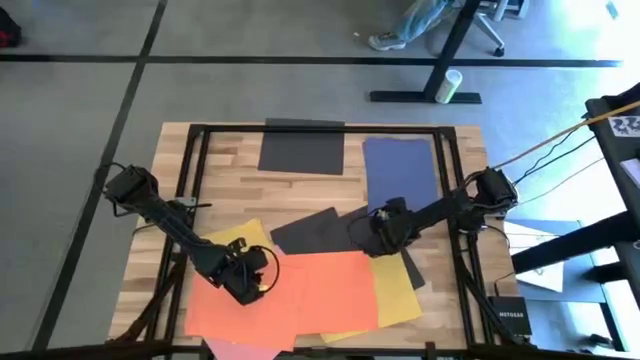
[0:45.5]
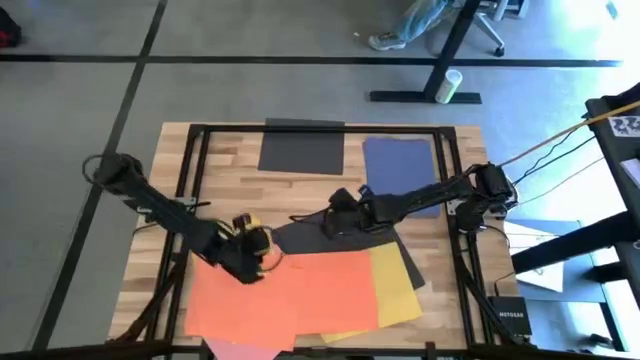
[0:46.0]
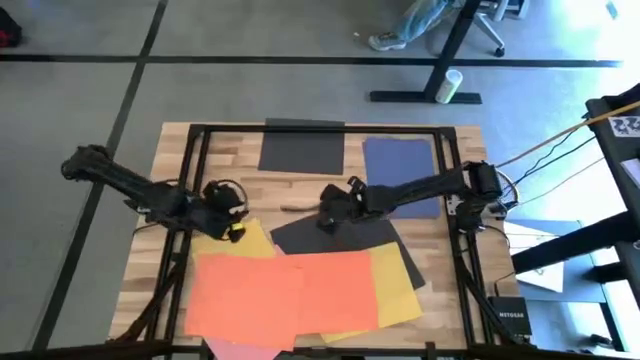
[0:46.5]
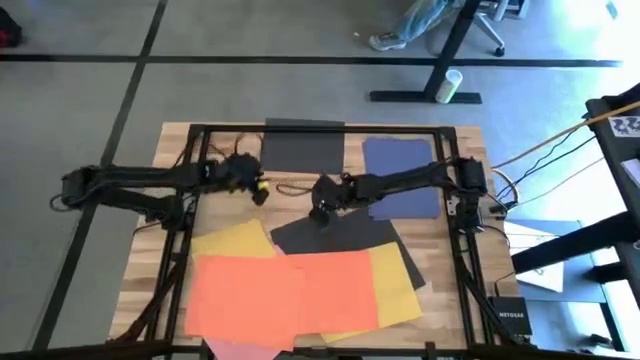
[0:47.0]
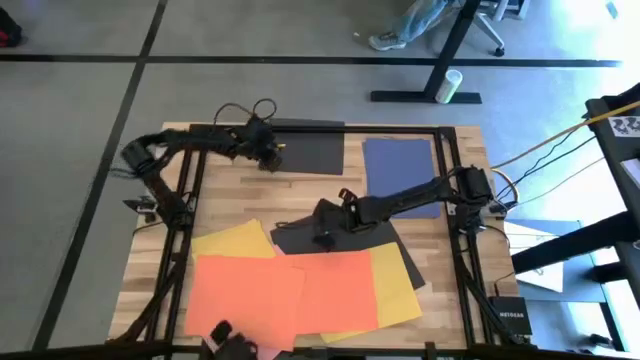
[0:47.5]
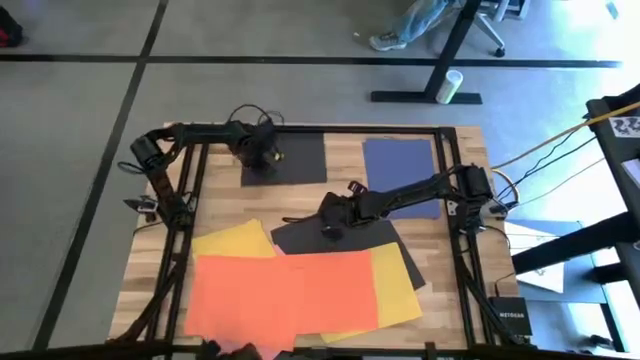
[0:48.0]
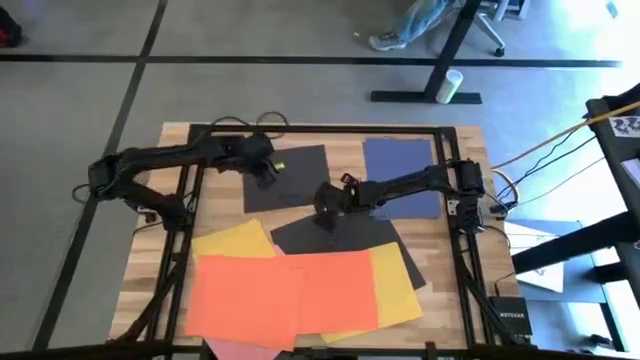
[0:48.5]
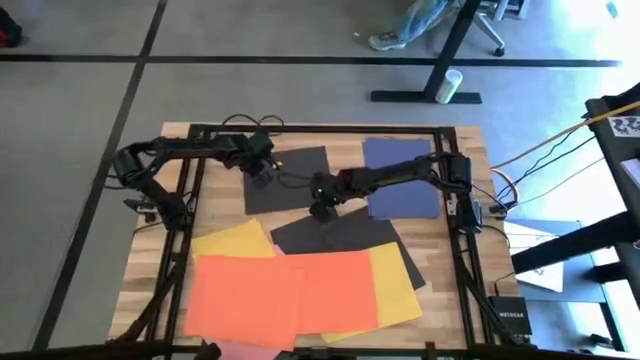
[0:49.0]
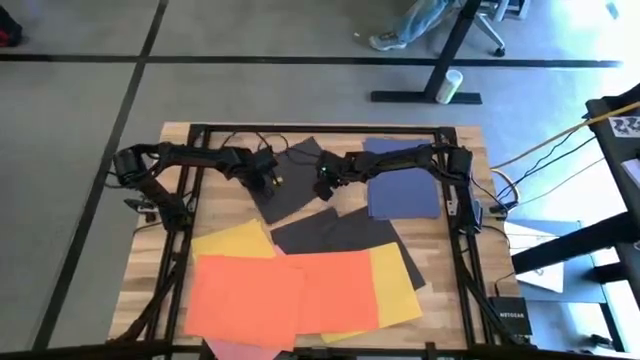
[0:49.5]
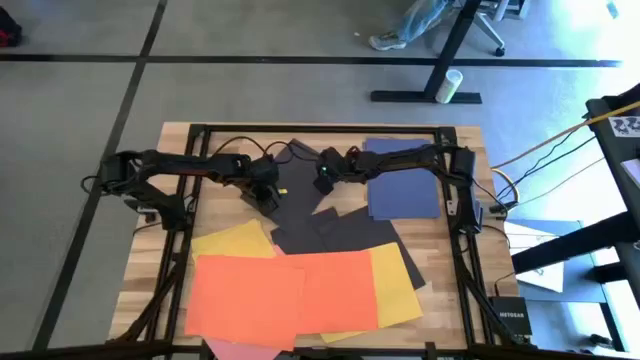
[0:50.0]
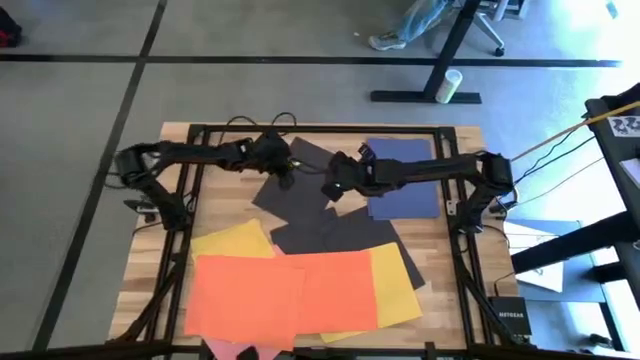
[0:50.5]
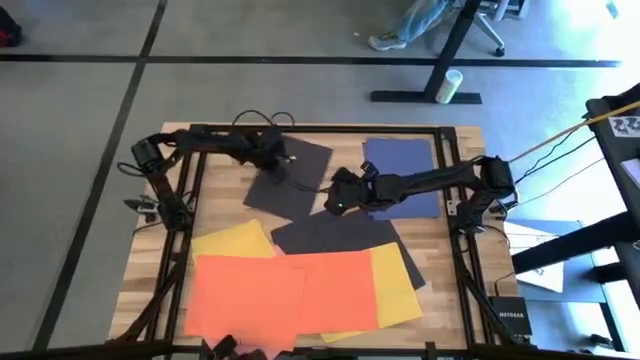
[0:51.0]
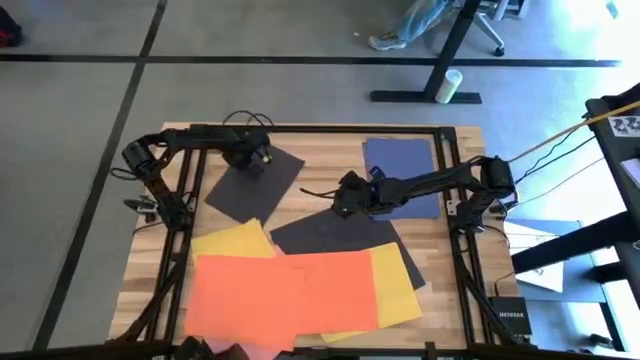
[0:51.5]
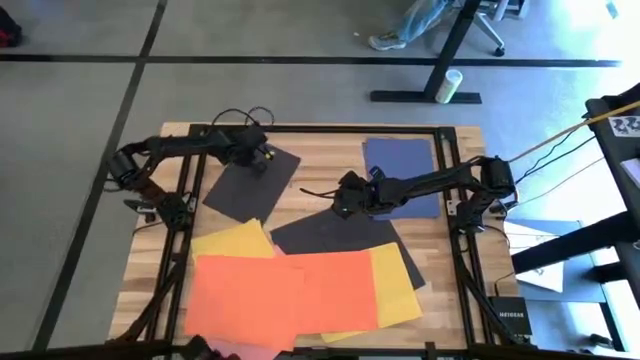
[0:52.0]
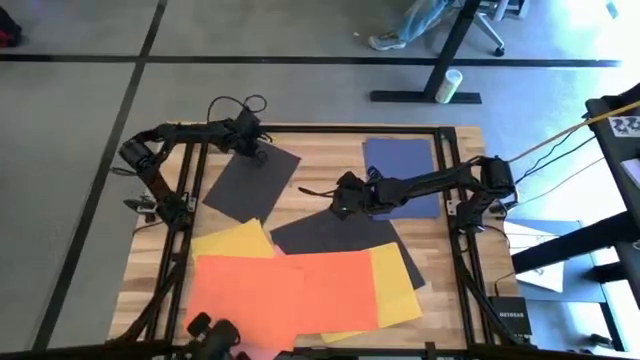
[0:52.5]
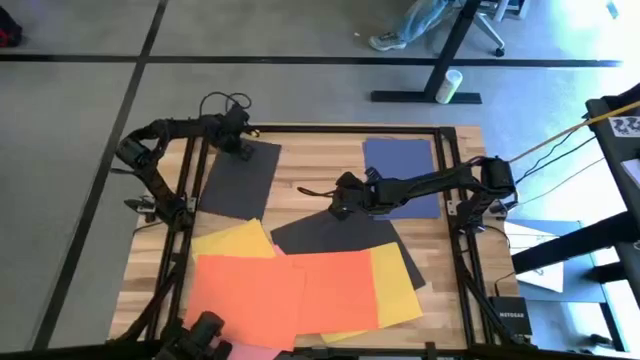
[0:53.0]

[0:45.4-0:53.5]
Task: Organize paper
Move the black paper to the top left of the table

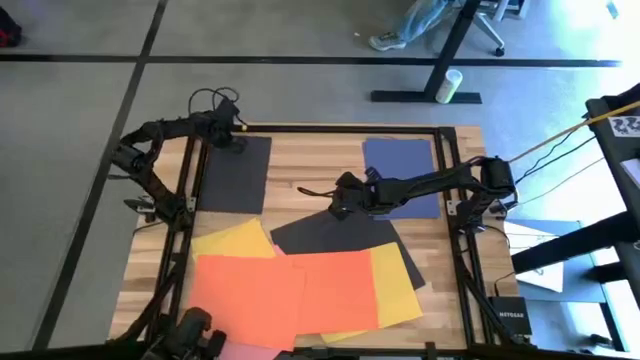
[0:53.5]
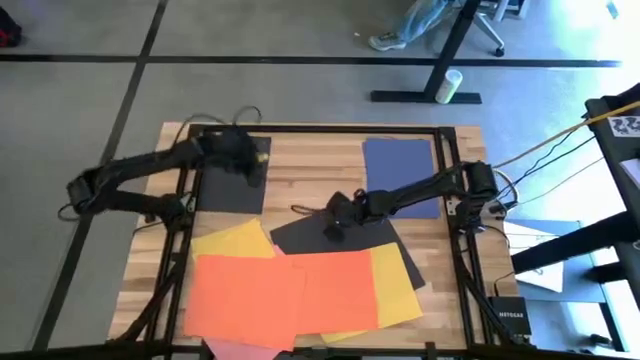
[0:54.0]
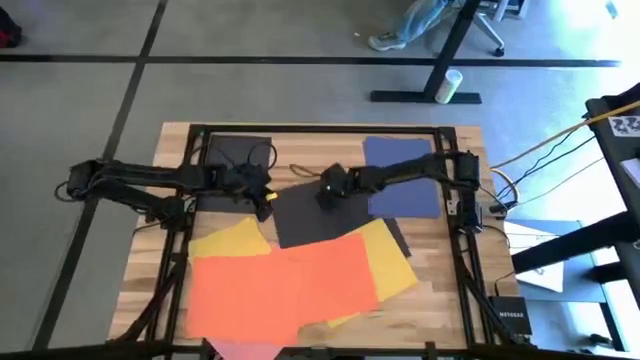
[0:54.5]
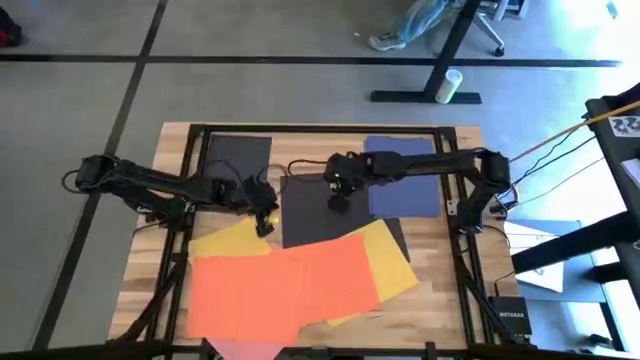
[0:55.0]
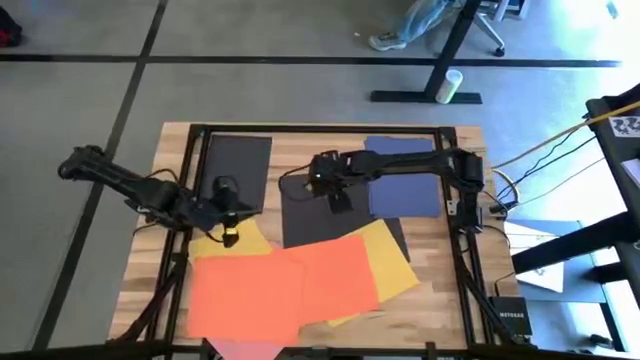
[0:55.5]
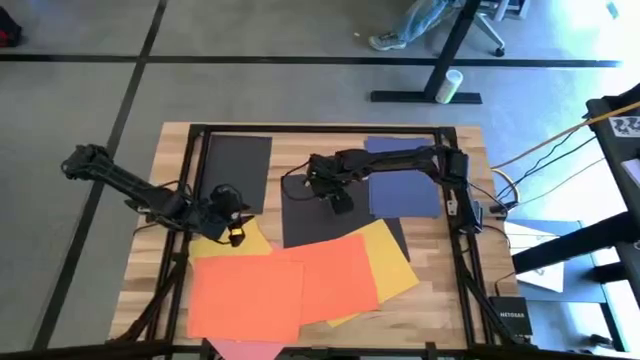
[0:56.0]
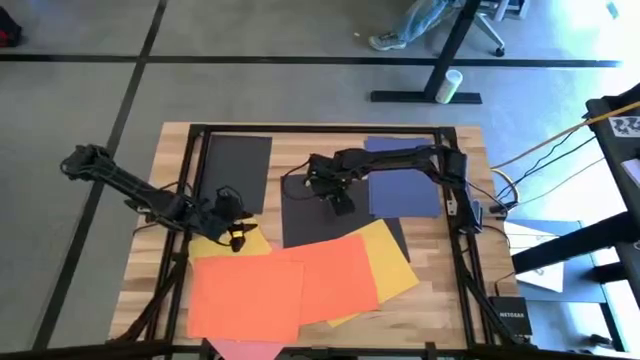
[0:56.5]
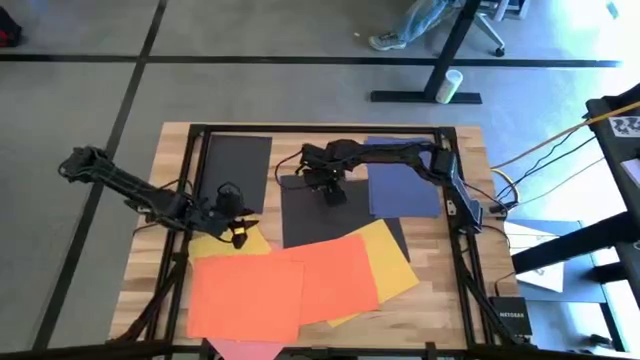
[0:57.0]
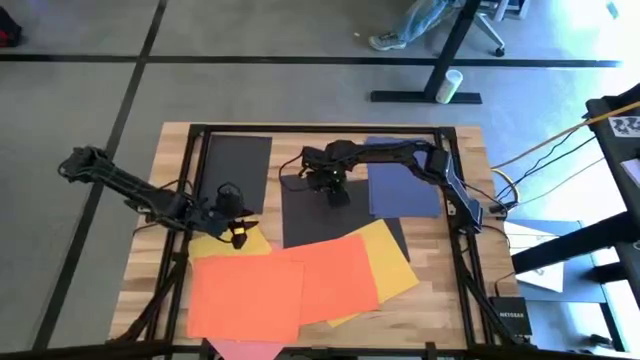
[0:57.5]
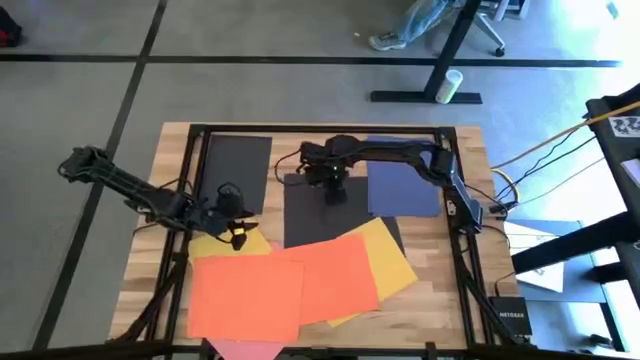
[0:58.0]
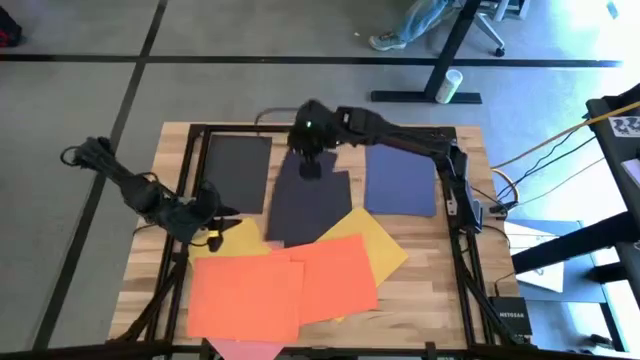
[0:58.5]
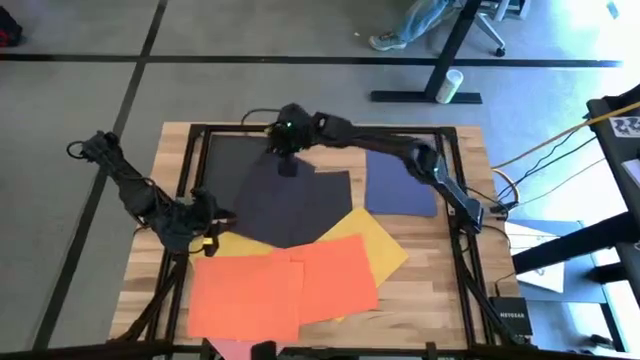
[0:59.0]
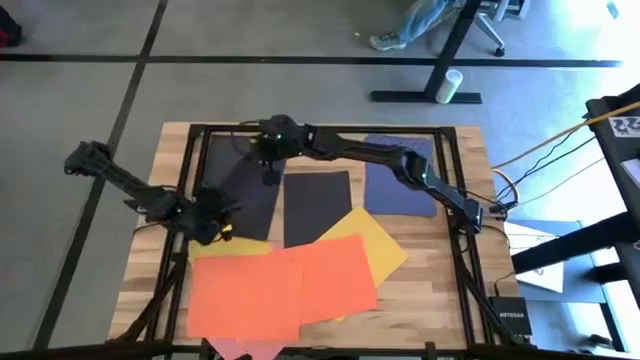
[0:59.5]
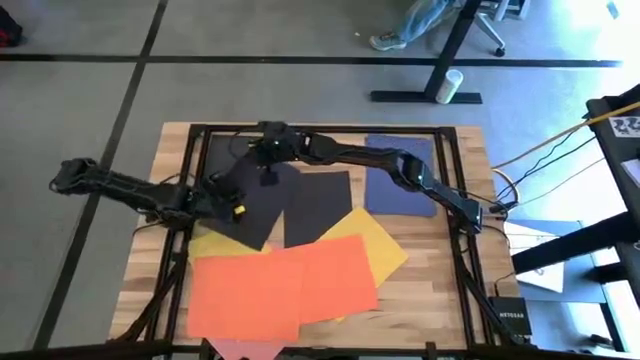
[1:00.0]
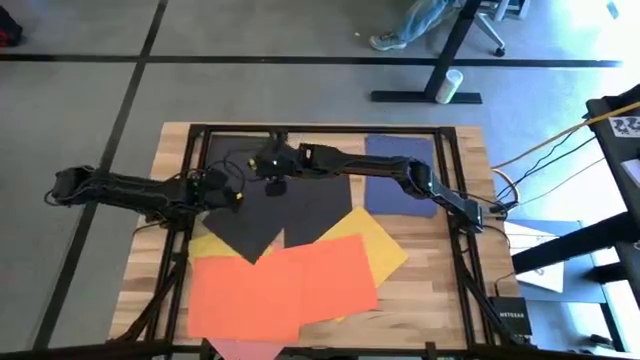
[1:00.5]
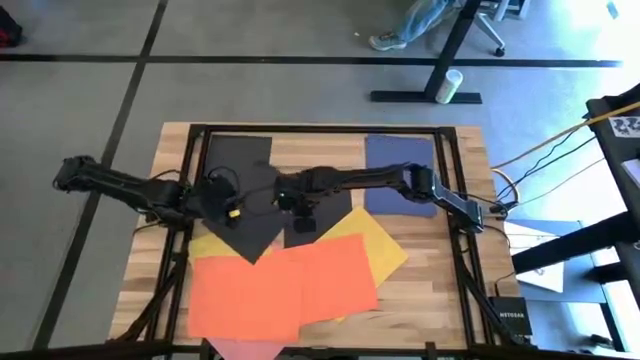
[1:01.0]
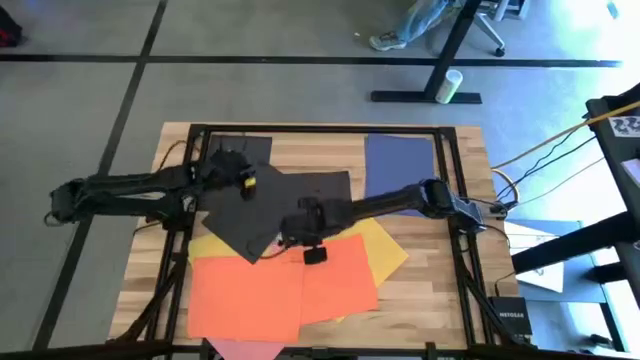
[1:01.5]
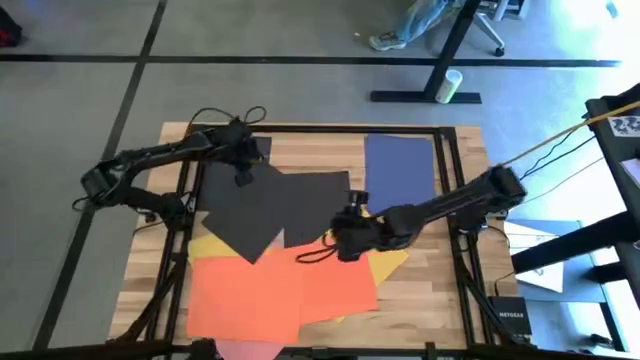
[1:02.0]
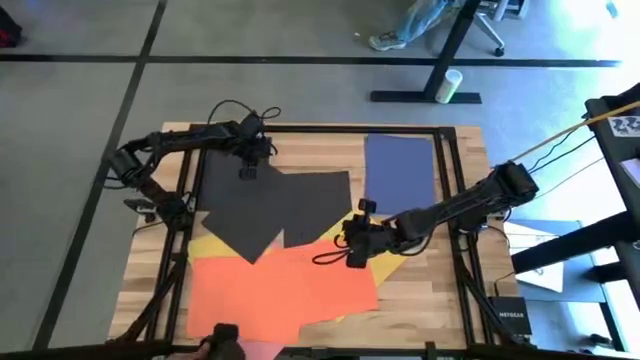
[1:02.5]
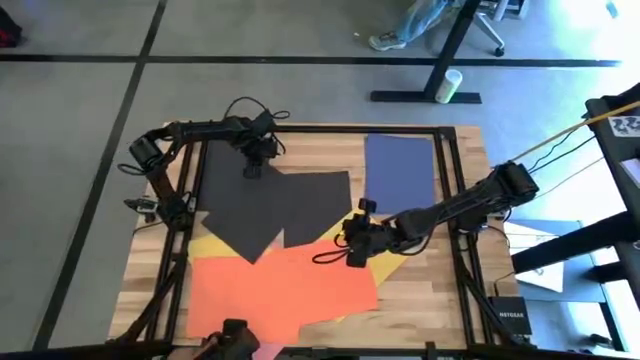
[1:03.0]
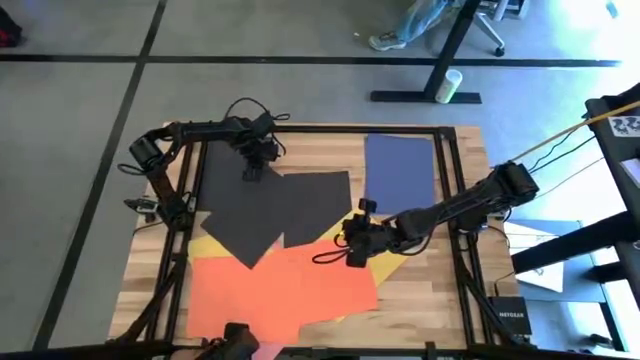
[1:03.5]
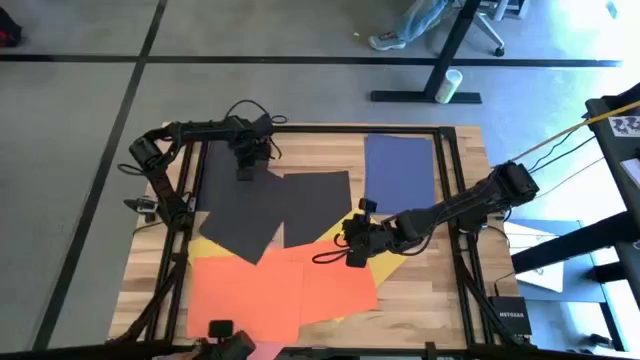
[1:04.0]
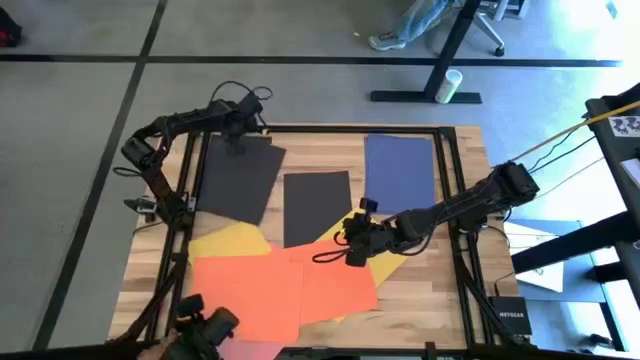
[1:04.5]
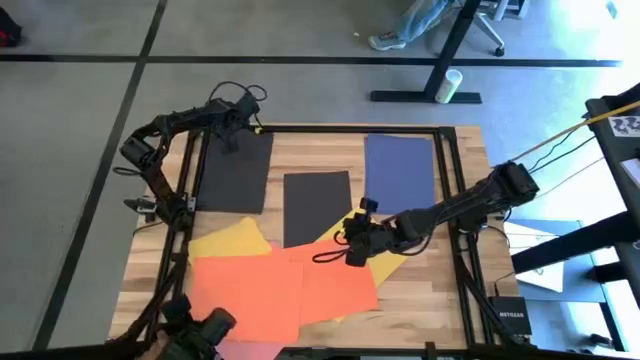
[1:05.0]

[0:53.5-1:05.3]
Stack the black paper on top of the other black paper
